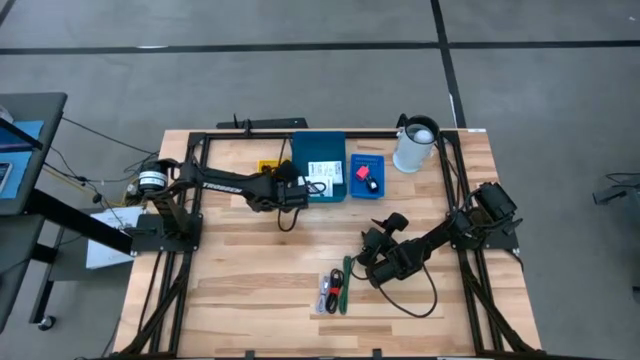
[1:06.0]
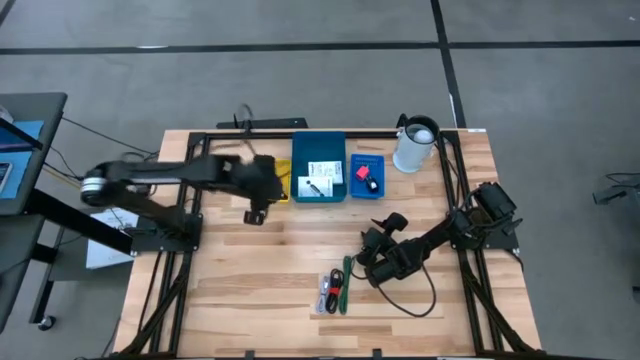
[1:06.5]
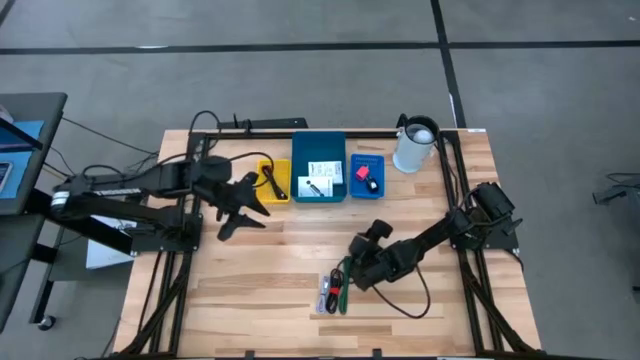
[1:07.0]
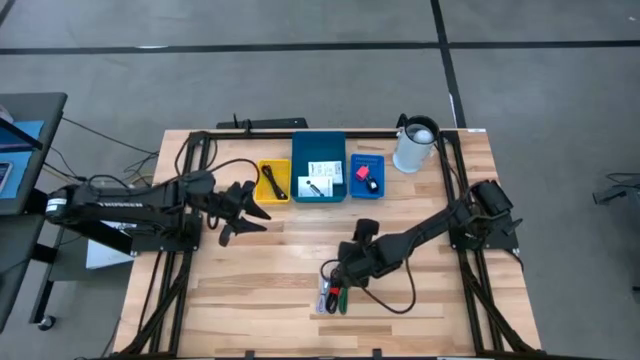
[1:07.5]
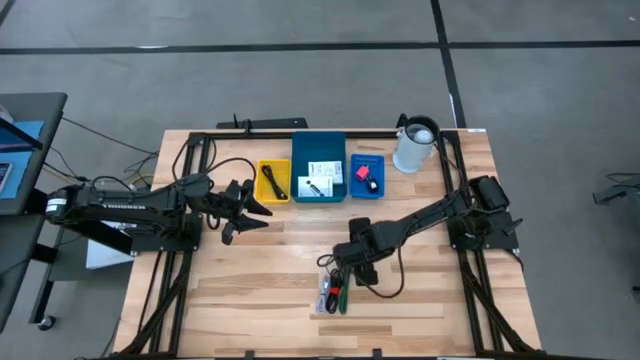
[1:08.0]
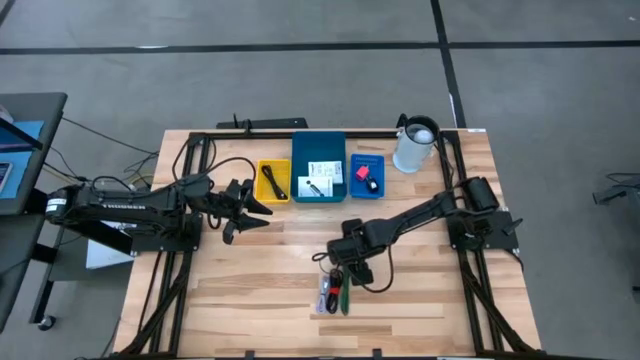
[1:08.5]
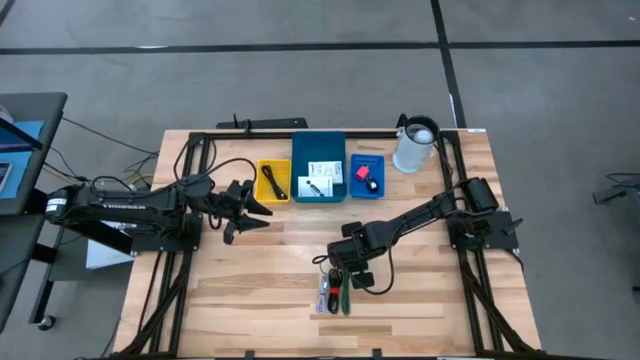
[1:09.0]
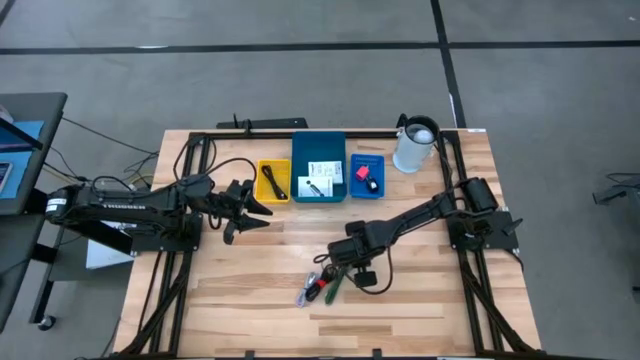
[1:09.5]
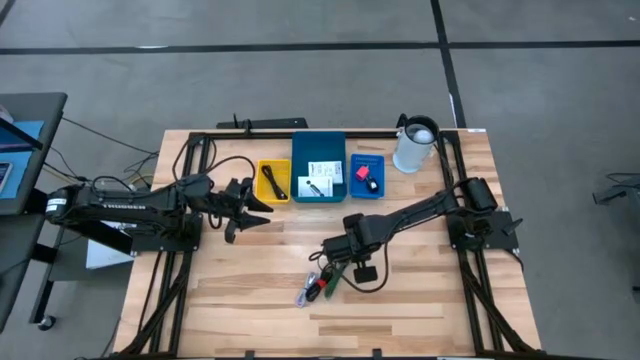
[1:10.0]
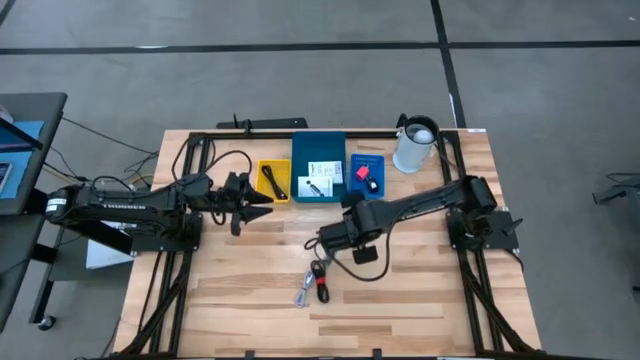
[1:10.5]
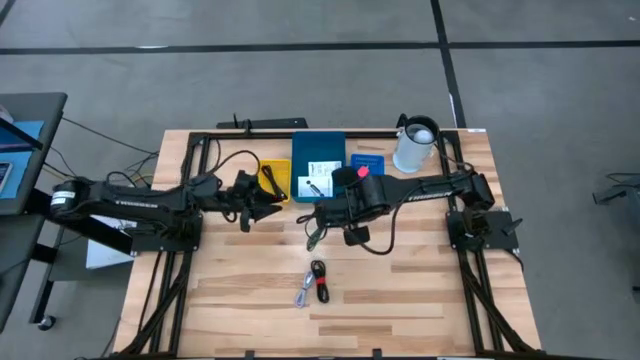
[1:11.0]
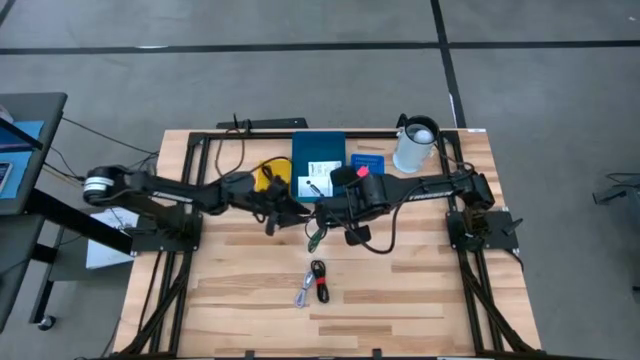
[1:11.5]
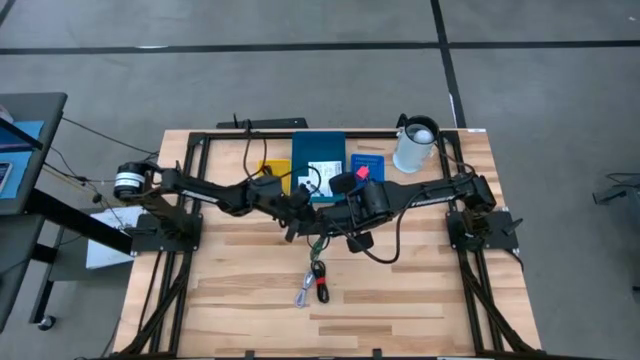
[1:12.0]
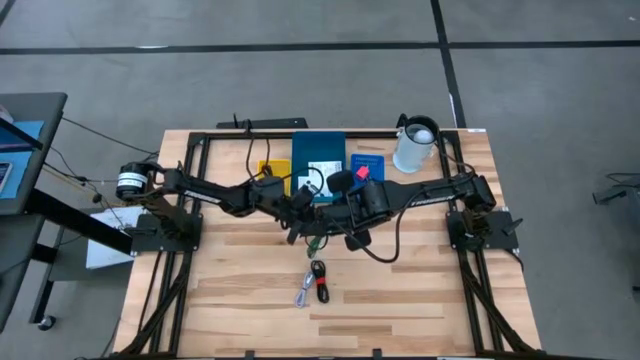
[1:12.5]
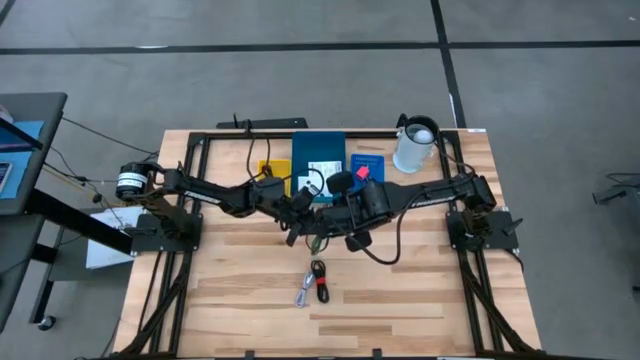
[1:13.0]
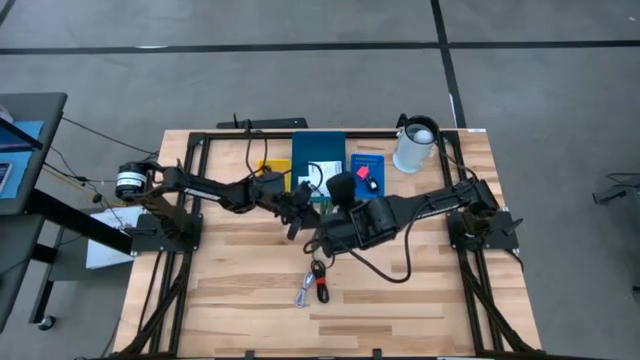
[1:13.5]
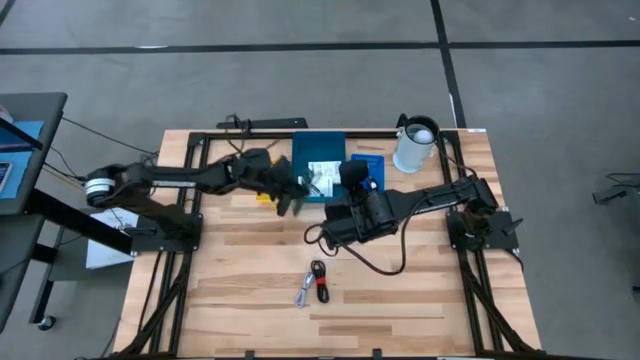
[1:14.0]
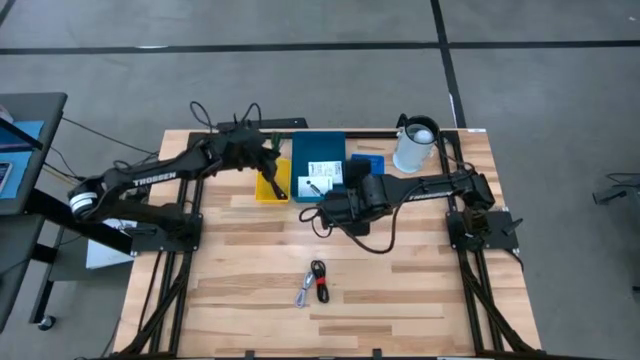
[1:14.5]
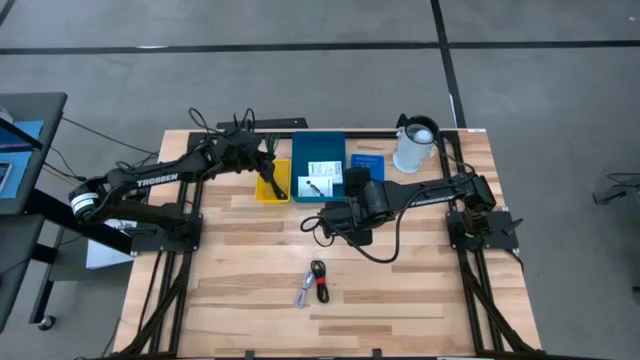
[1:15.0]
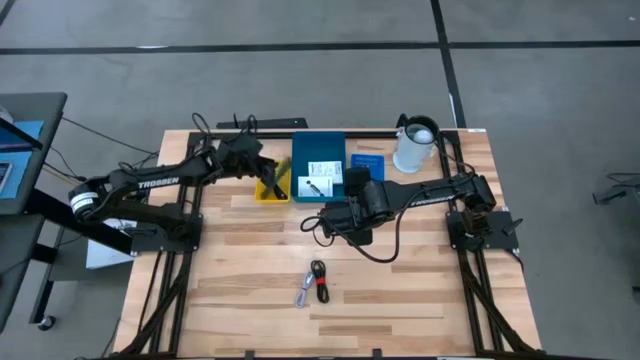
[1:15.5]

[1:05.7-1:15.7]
Task: Pick and place items into bin
Put the green charger cable into the yellow bin

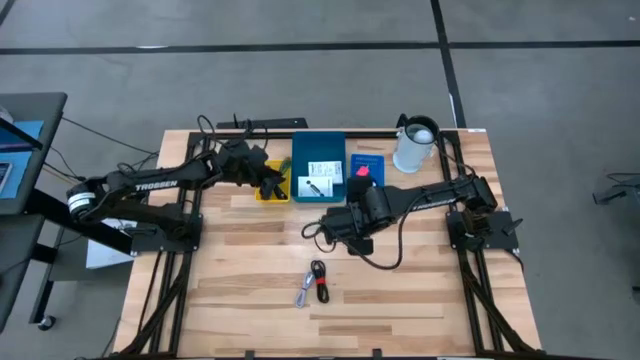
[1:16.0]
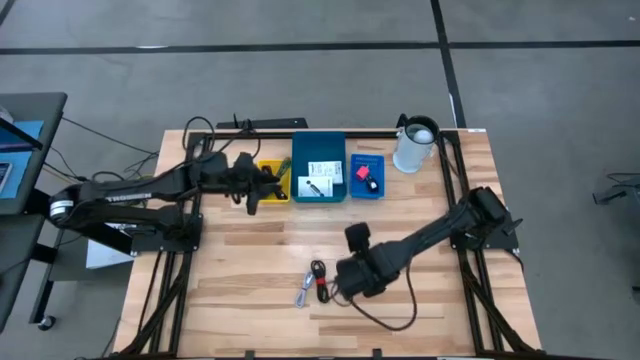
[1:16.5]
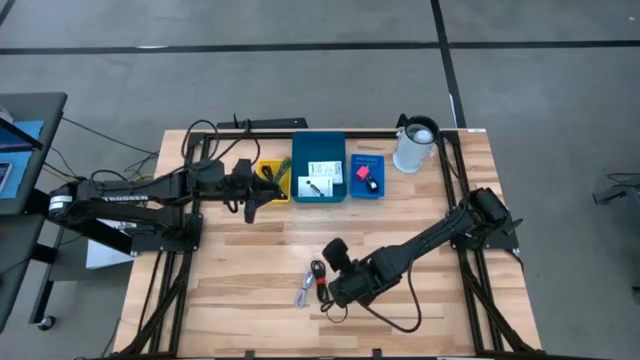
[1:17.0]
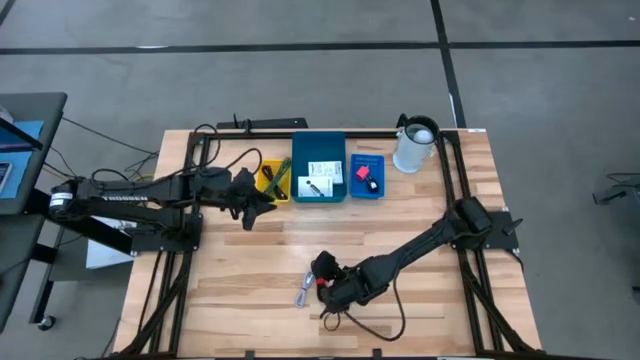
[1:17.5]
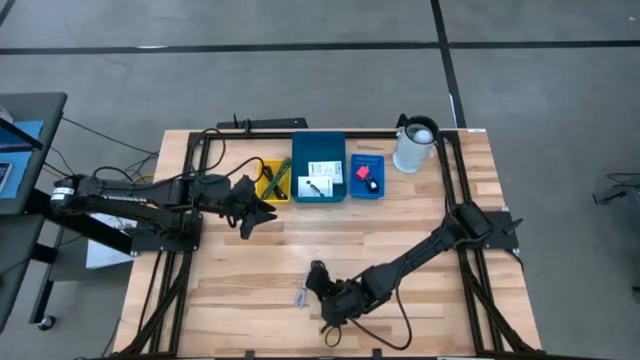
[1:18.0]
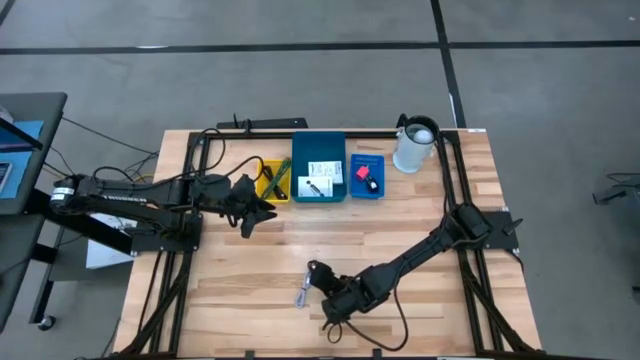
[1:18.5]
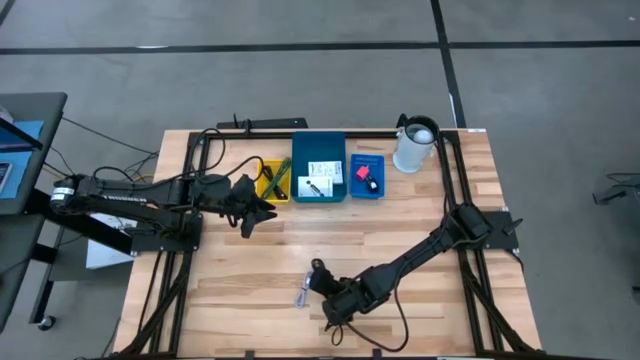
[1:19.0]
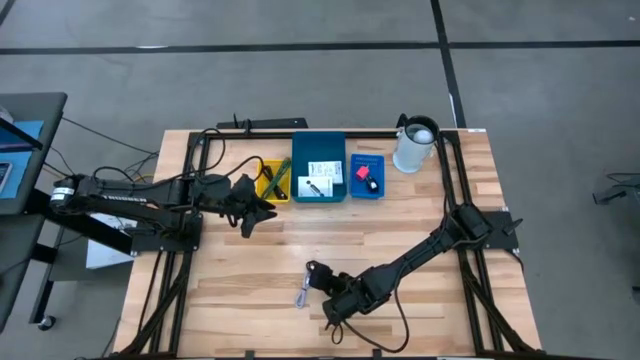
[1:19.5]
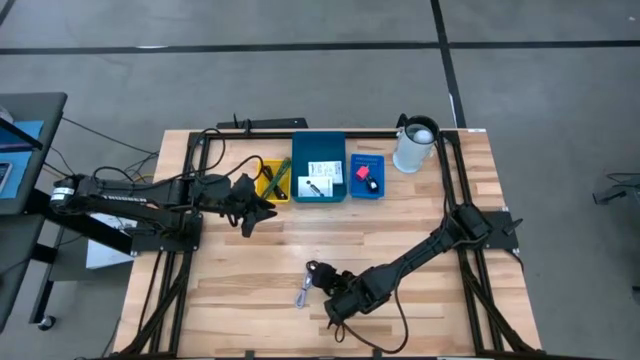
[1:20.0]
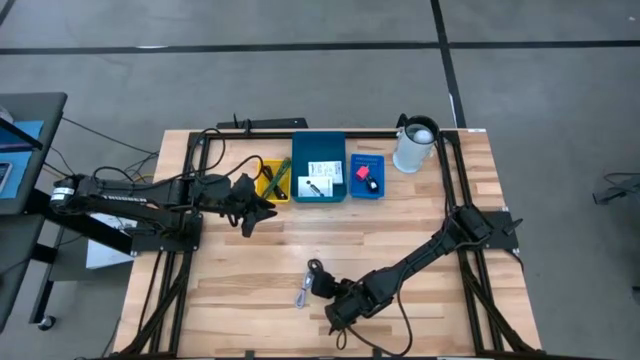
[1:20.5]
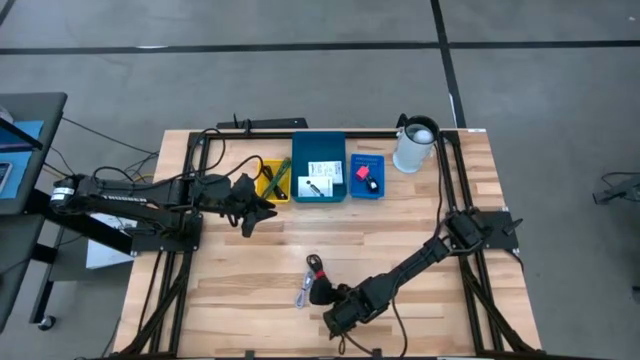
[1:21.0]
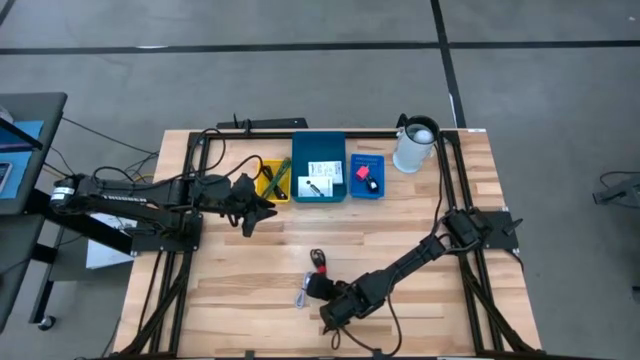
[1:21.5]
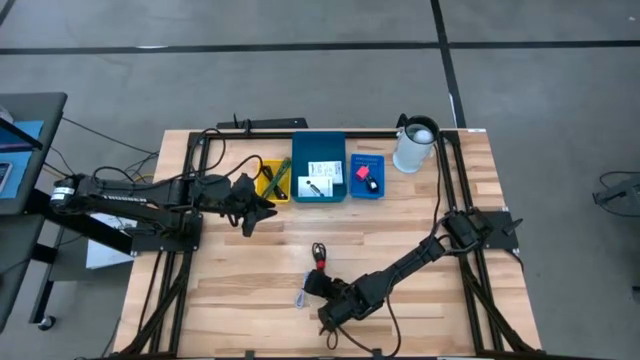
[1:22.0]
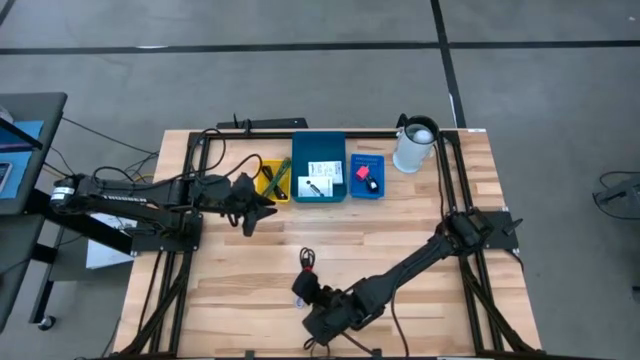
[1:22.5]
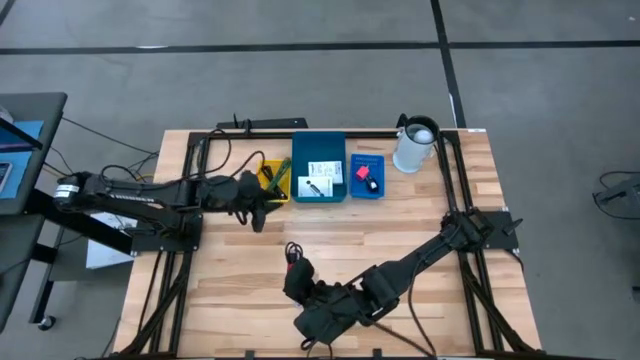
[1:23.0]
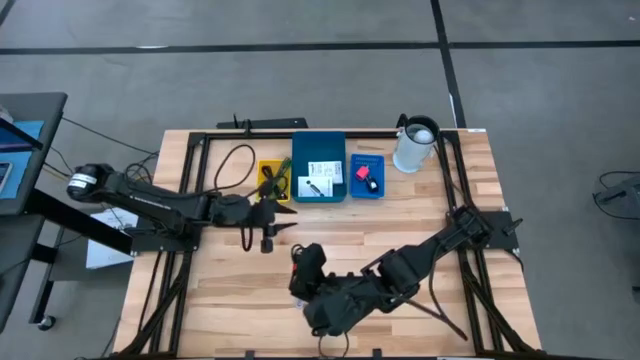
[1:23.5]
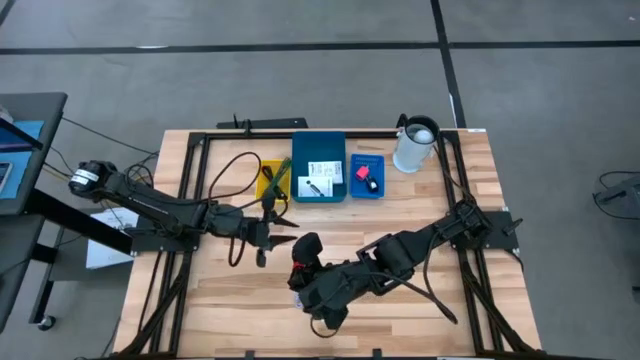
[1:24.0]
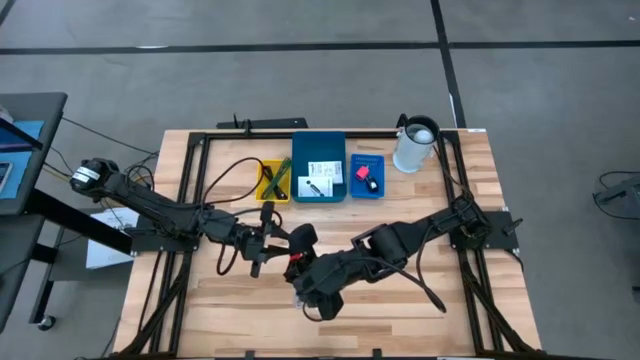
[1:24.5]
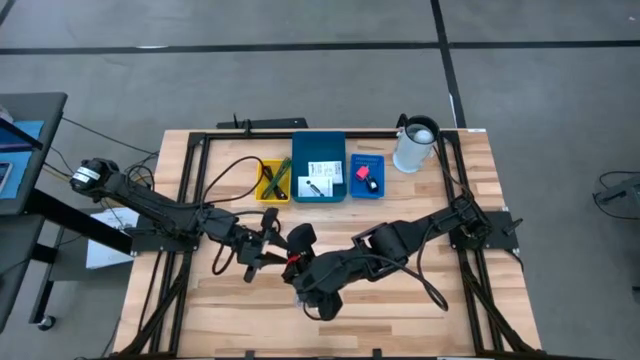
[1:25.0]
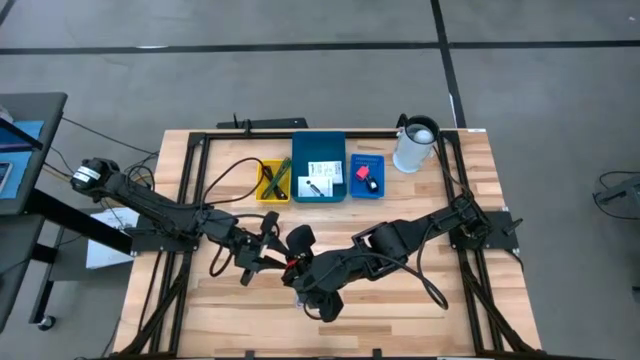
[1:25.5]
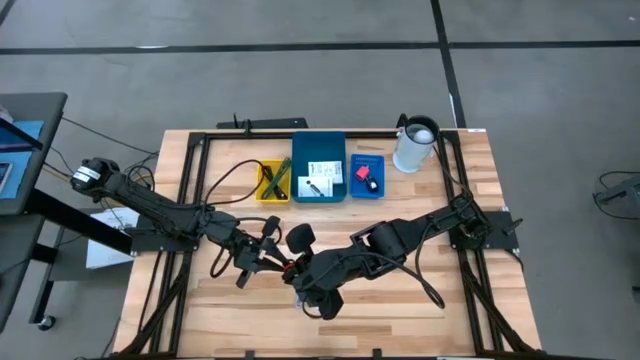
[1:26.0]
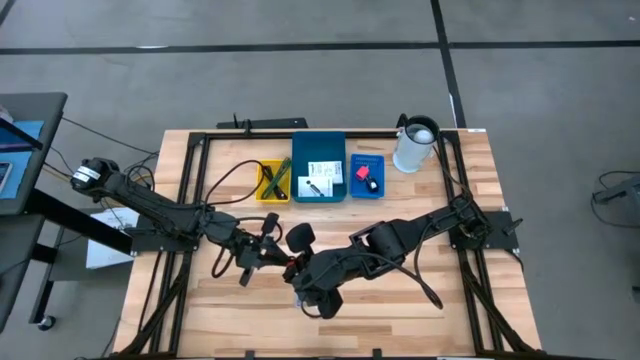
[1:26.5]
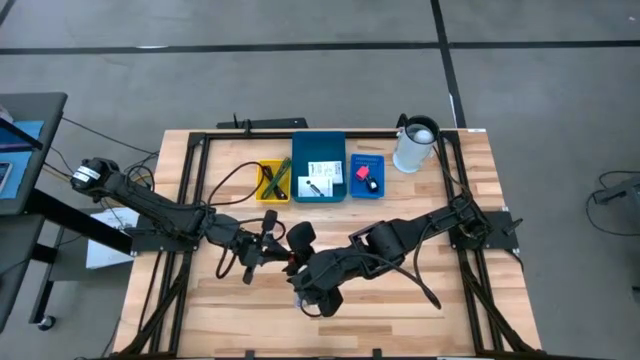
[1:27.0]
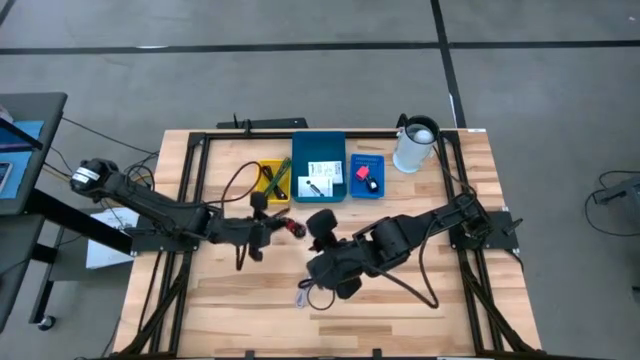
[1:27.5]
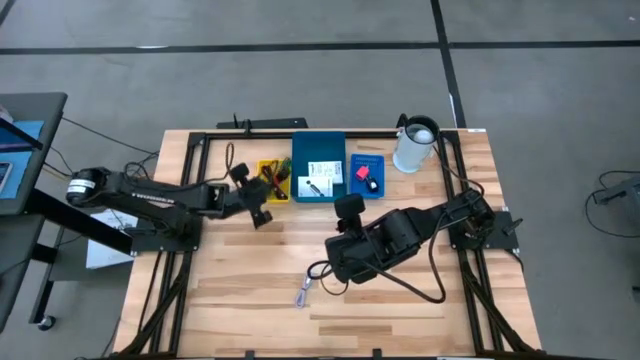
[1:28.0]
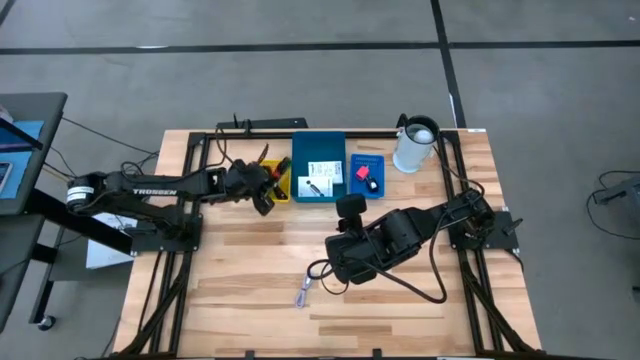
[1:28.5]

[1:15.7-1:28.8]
Put the black charger cable into the yellow bin
